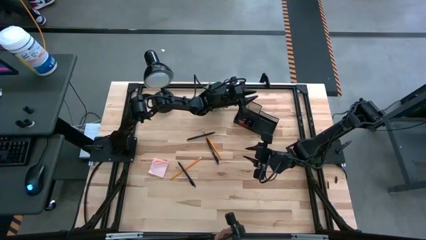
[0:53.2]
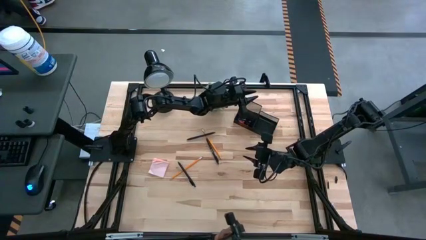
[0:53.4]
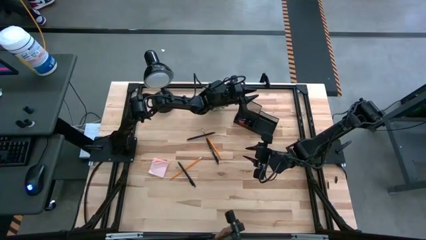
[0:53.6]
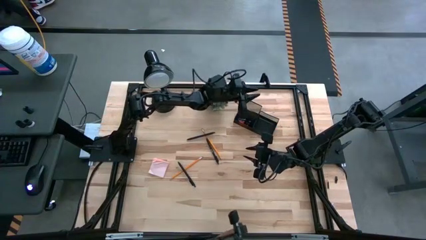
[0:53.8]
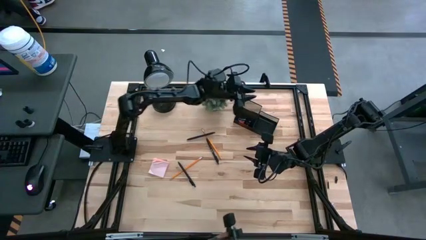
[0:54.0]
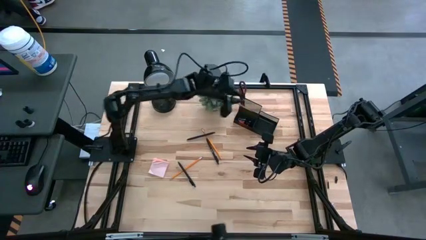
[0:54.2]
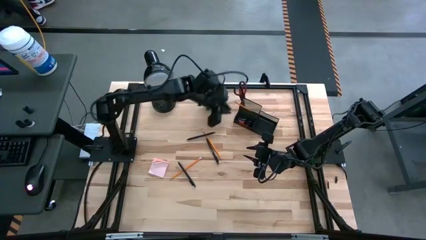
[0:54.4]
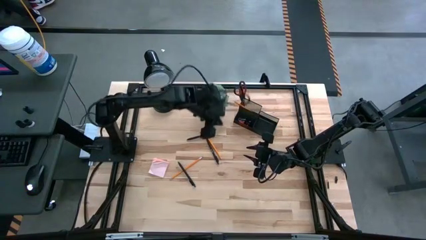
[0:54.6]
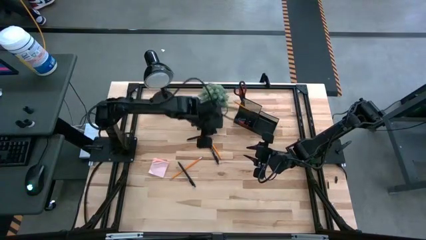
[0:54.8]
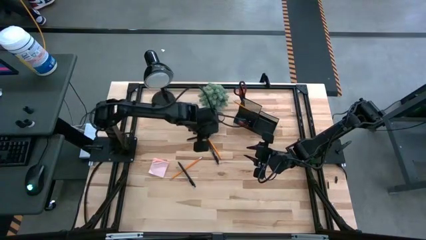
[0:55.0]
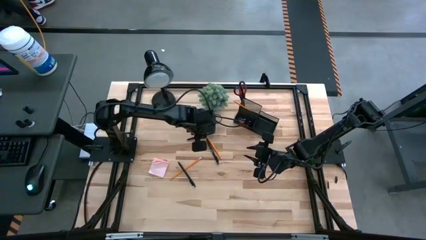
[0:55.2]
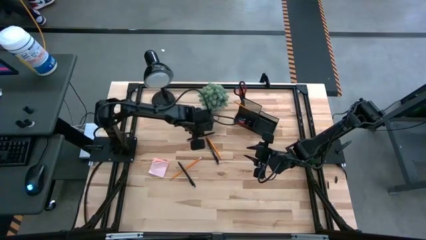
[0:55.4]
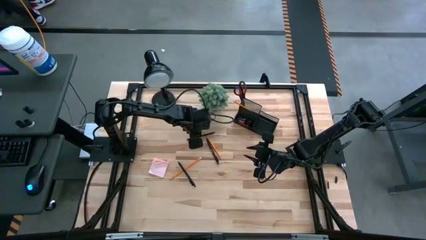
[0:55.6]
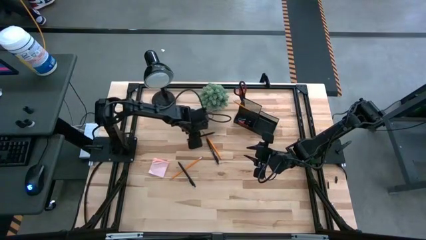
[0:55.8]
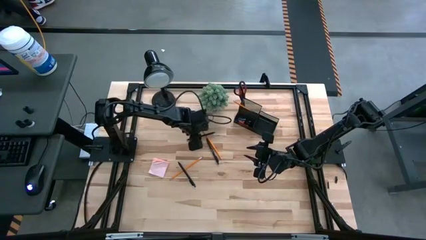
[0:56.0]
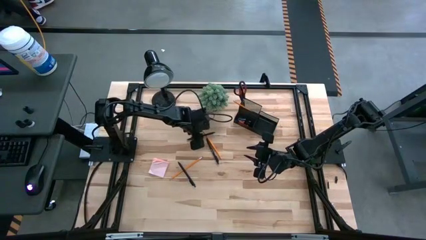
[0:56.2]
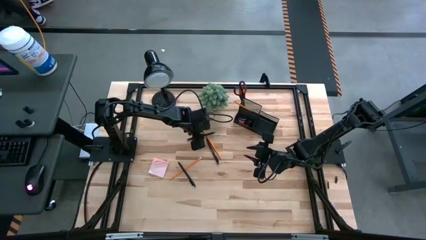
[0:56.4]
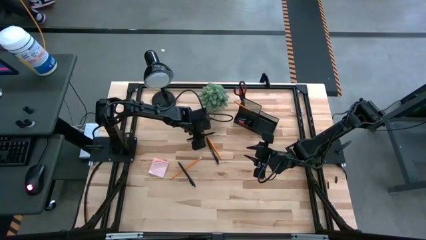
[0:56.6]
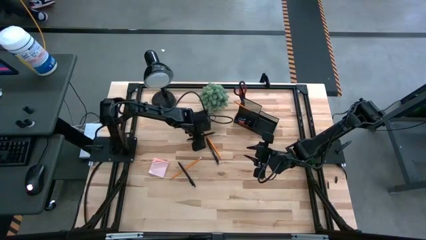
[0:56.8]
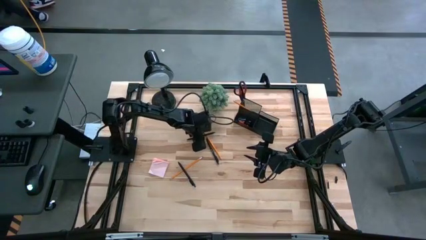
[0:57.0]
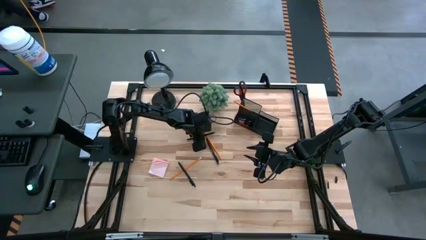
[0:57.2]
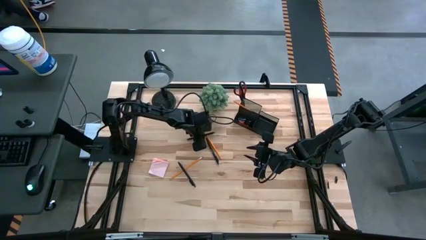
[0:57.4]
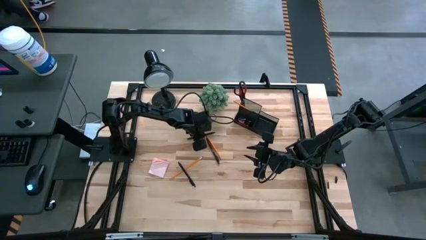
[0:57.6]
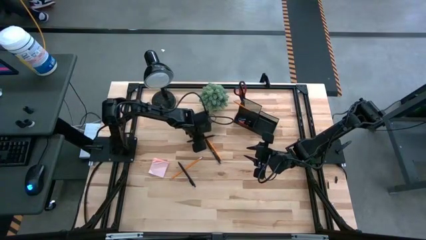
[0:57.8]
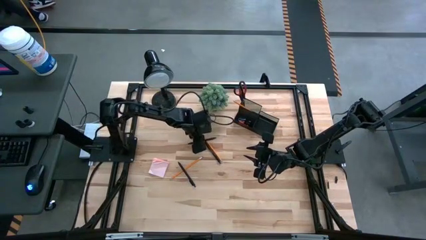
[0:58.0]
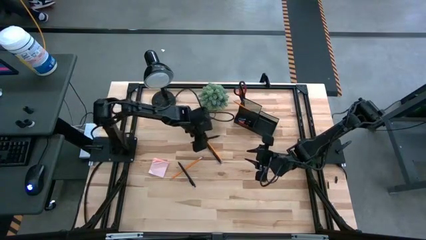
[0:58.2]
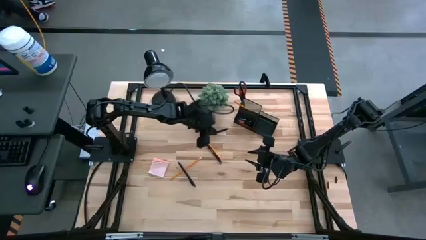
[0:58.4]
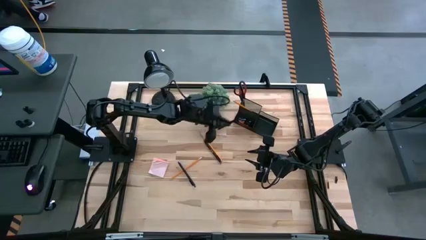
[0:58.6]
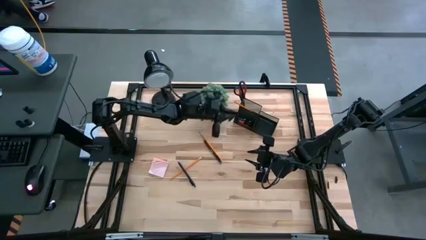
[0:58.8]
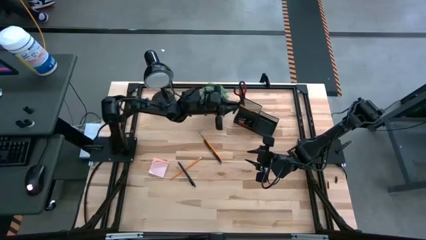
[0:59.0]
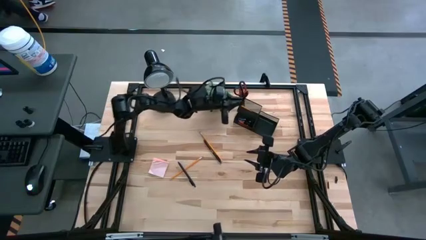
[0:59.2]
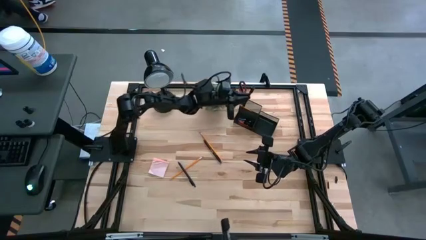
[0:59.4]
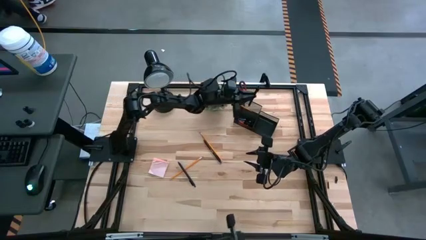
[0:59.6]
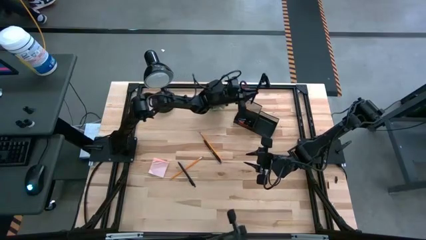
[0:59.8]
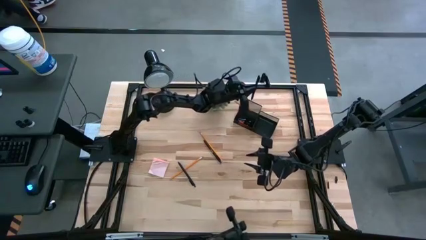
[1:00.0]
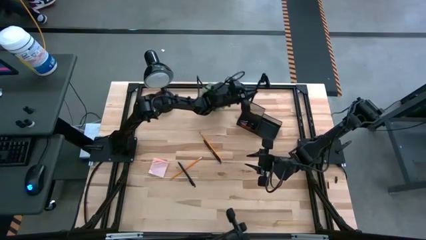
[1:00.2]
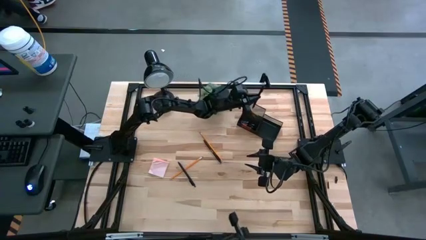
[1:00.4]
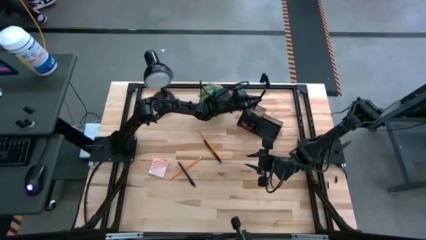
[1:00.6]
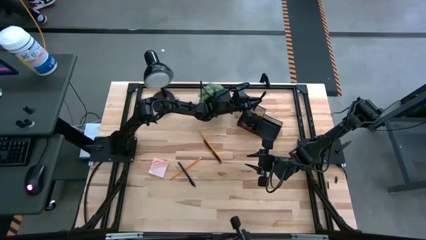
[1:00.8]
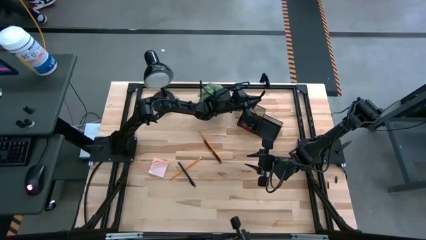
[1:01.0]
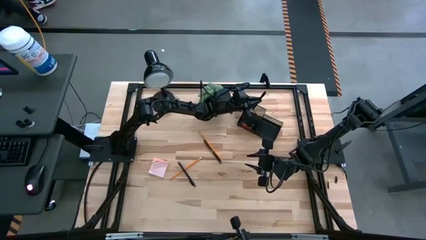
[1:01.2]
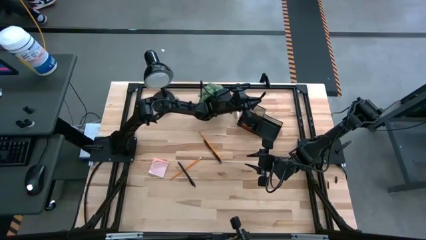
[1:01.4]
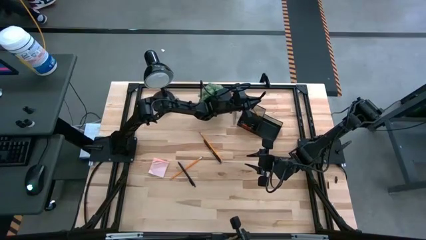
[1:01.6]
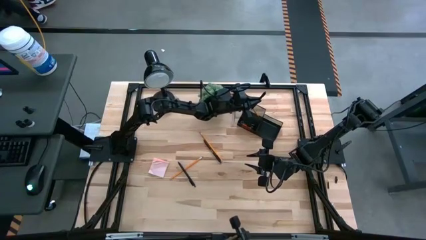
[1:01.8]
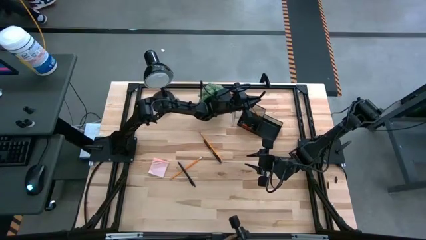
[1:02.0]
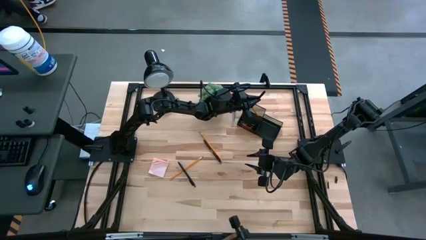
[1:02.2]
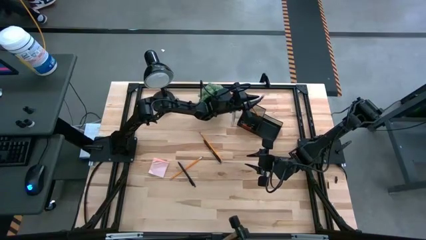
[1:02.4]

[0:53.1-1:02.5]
Task: Pick and place office supplies into organizer
Put the top black pen into the black desk organizer
